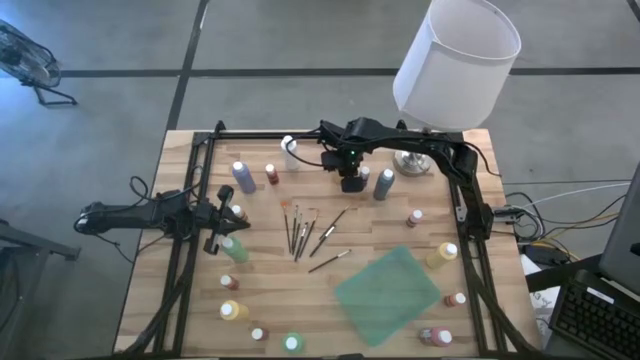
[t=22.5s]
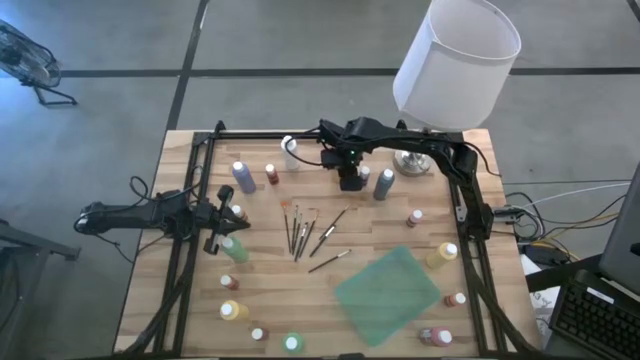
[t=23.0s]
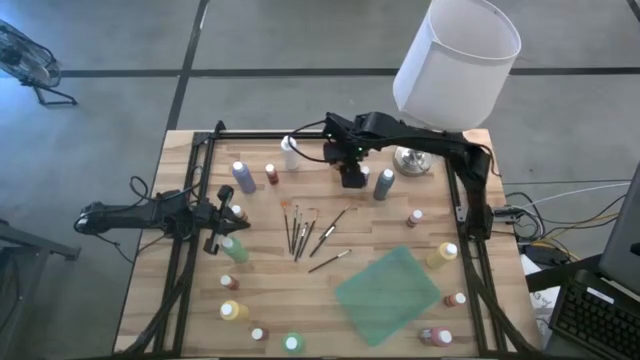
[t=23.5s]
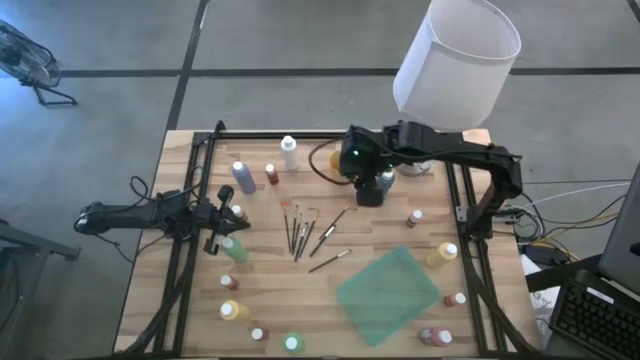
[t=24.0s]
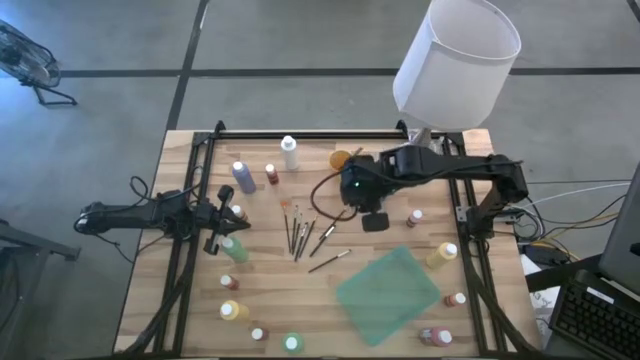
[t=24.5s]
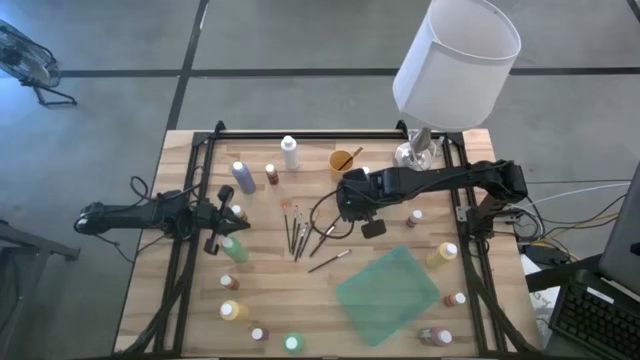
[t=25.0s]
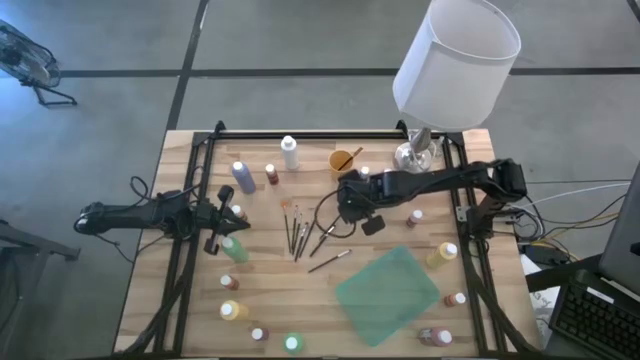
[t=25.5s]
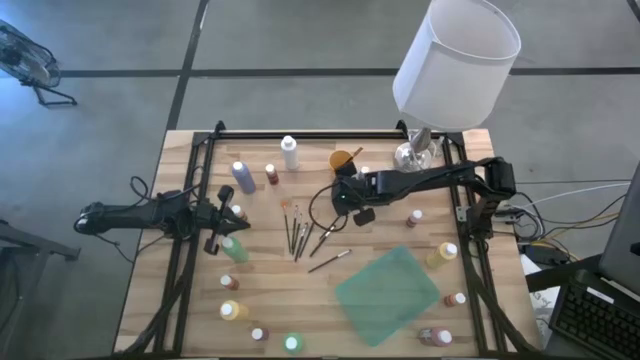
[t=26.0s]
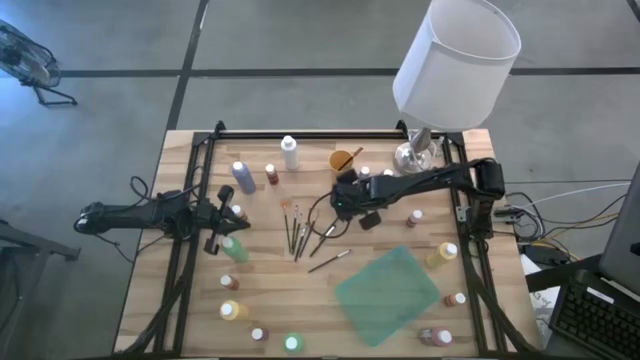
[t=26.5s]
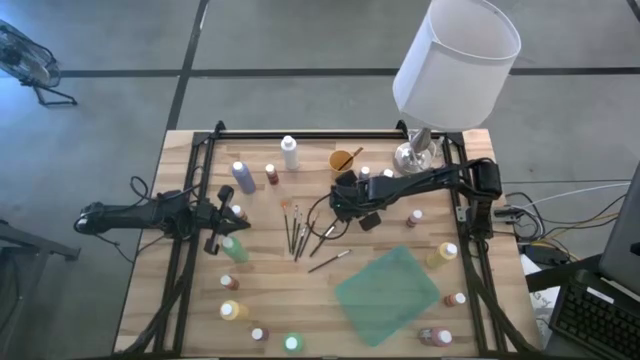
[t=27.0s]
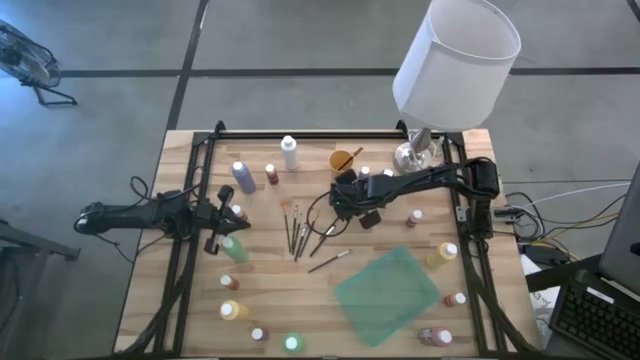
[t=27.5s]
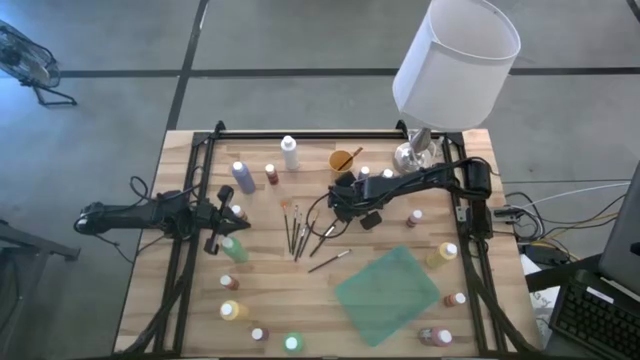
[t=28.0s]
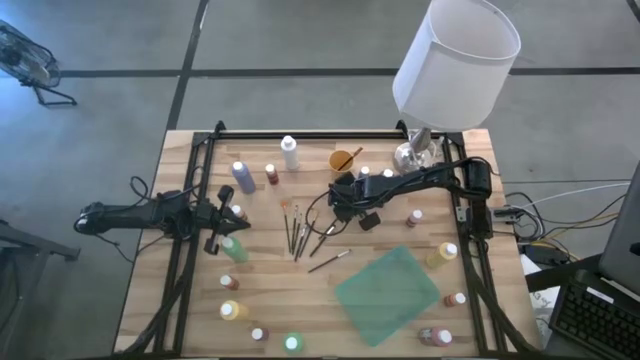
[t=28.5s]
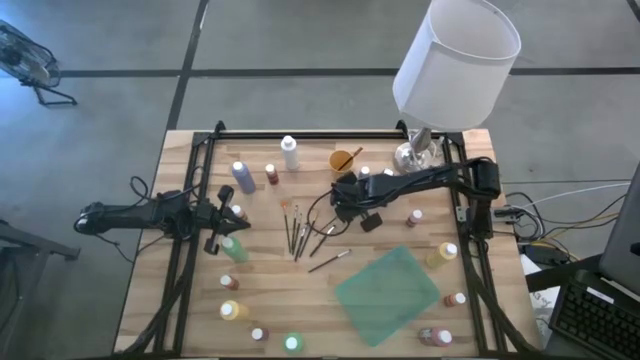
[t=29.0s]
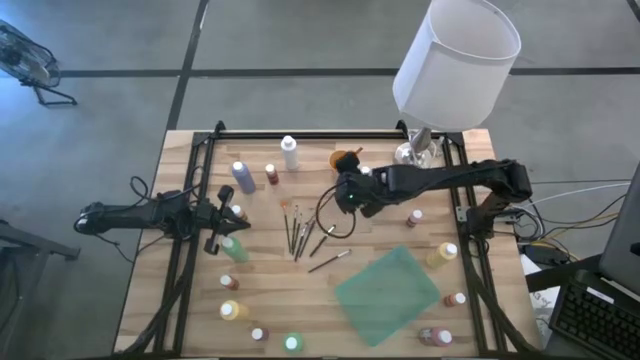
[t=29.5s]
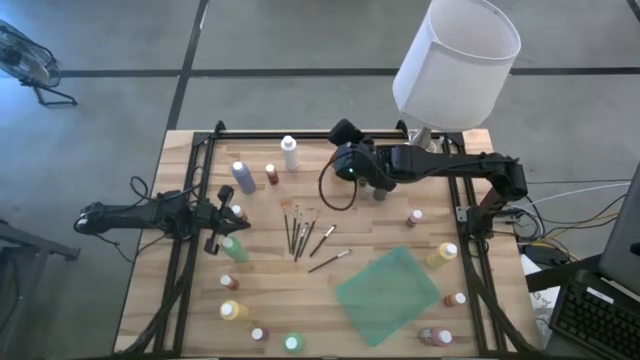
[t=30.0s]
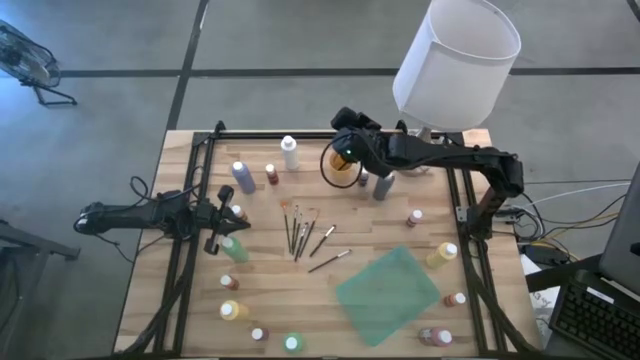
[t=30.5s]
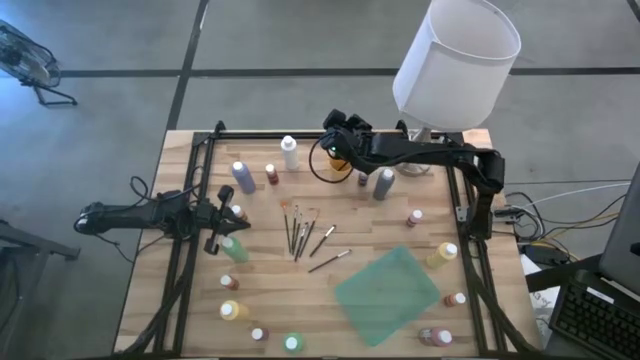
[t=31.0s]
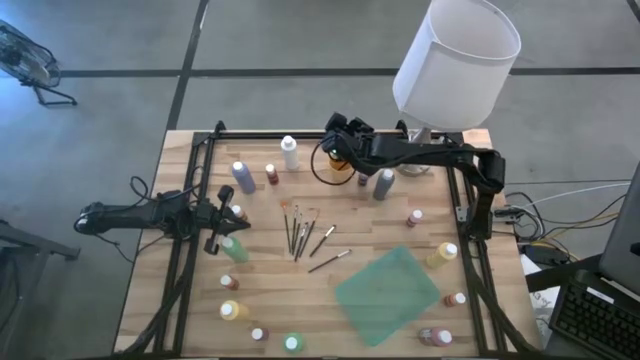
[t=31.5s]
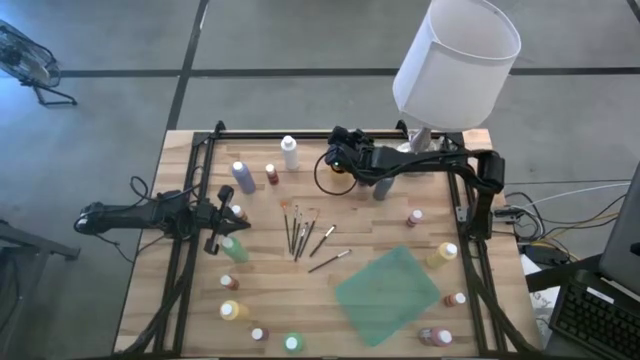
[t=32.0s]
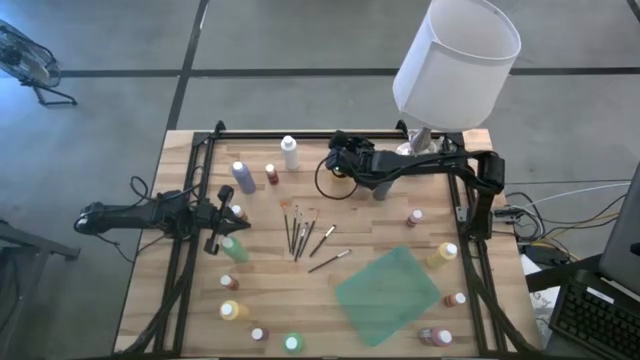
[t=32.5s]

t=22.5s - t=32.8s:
Task: Pick & Place Paint Supplies
Put the gold paintbrush into the yellow cup

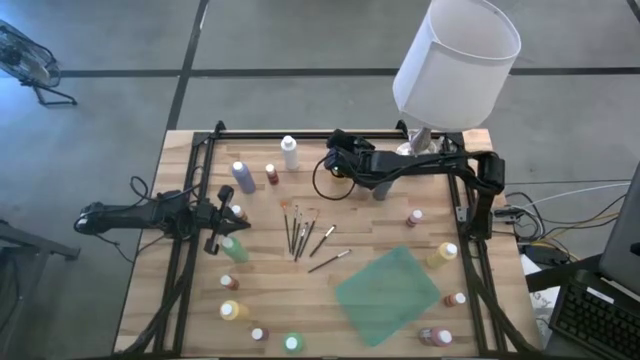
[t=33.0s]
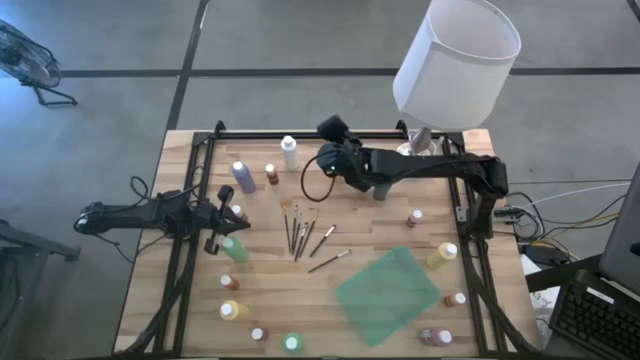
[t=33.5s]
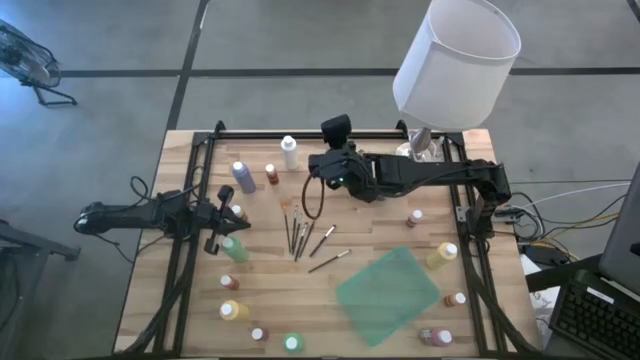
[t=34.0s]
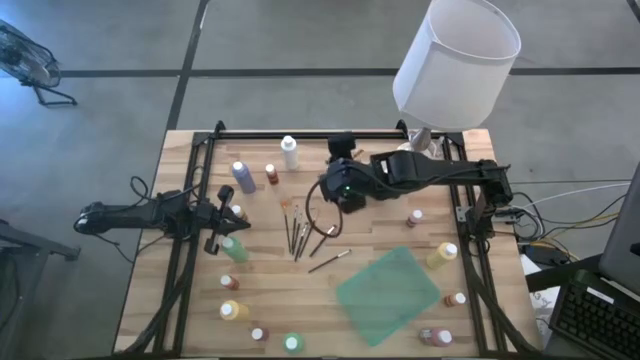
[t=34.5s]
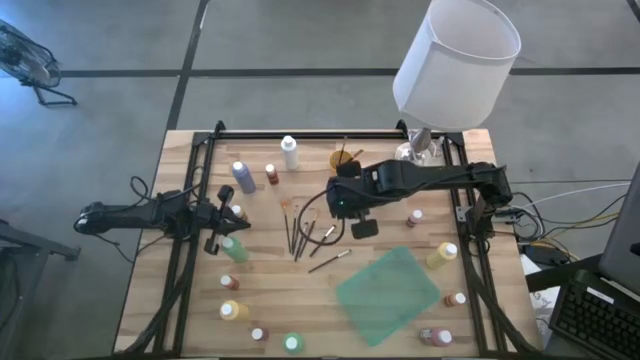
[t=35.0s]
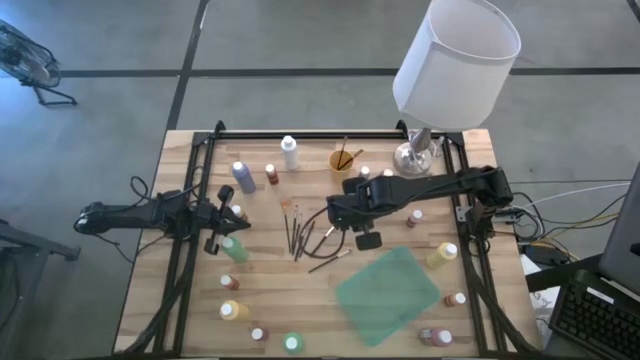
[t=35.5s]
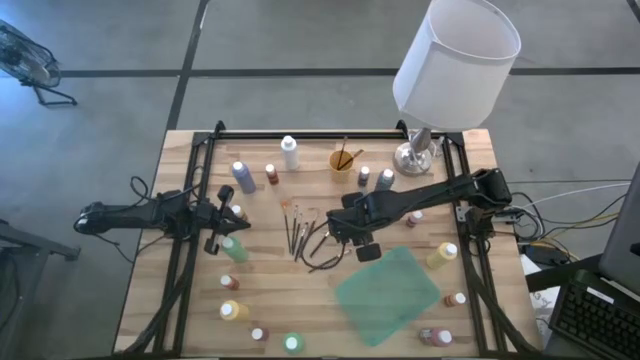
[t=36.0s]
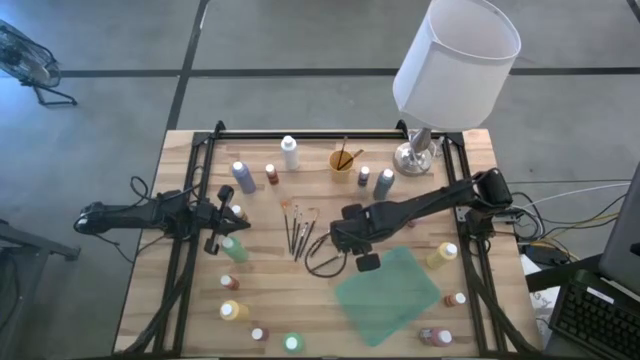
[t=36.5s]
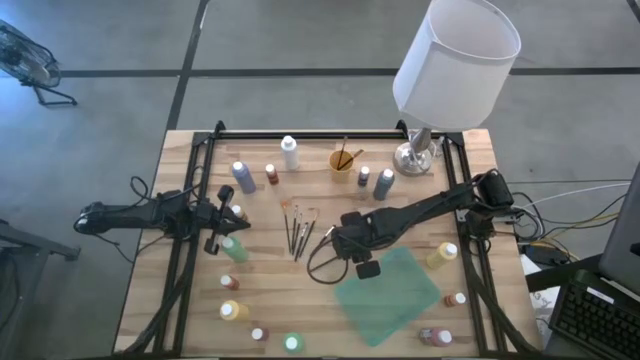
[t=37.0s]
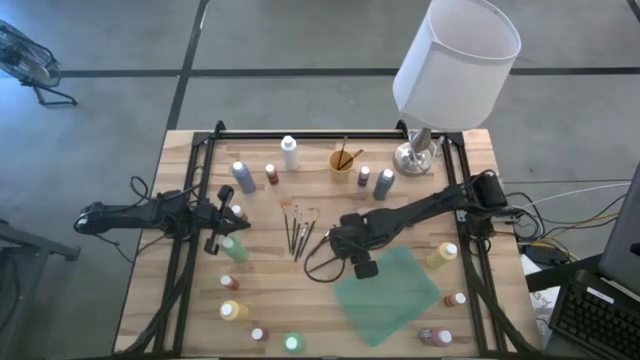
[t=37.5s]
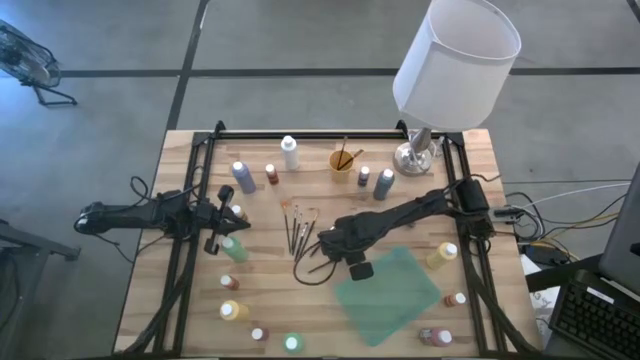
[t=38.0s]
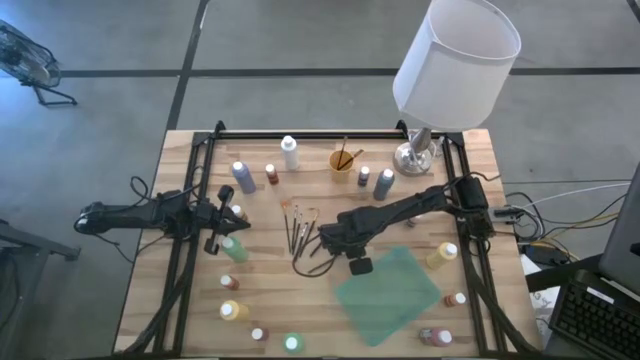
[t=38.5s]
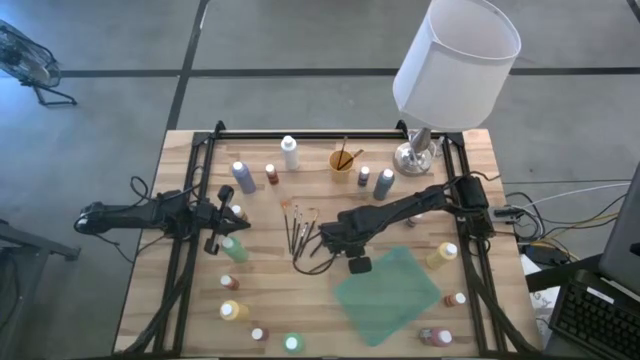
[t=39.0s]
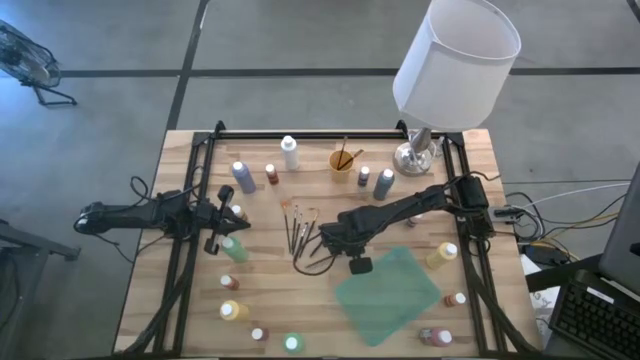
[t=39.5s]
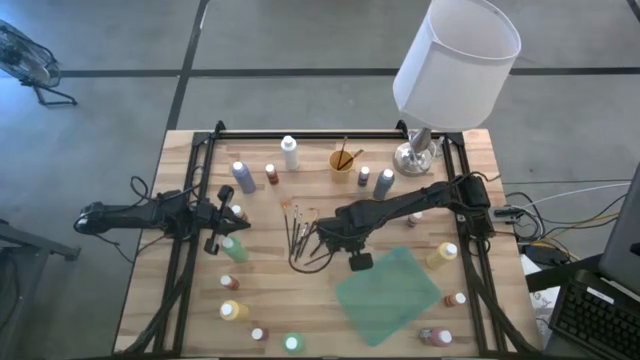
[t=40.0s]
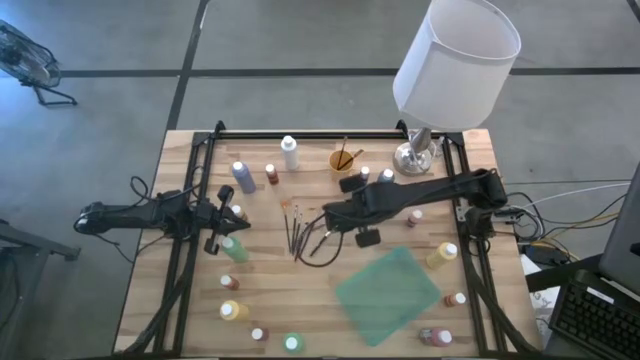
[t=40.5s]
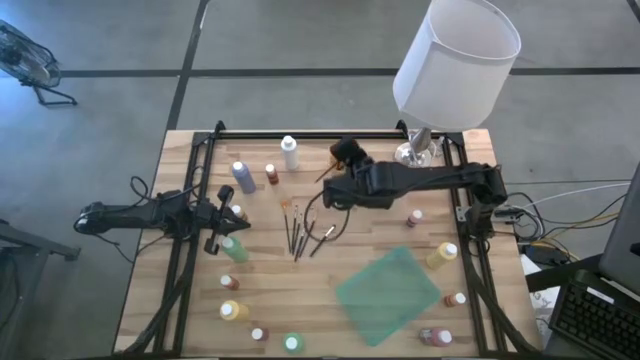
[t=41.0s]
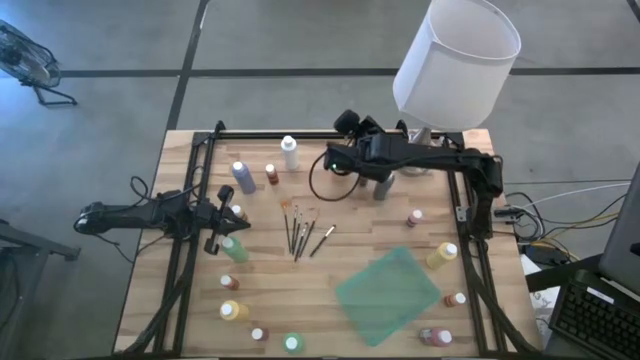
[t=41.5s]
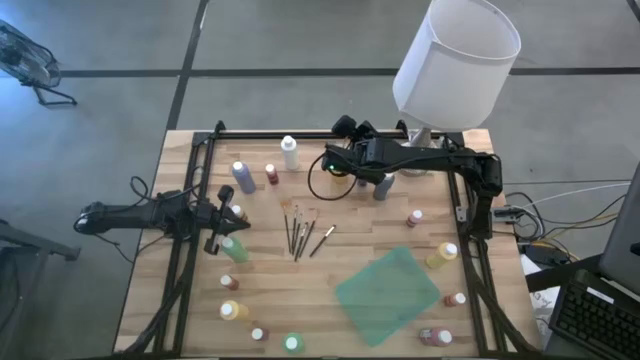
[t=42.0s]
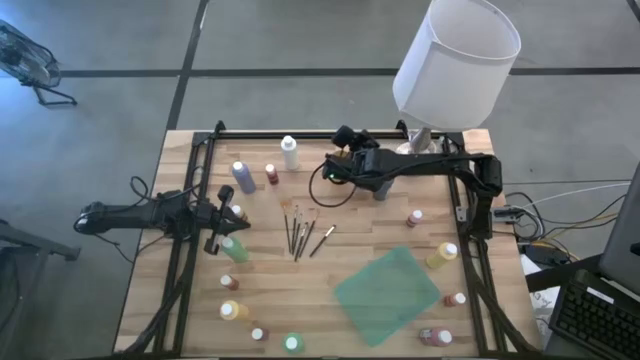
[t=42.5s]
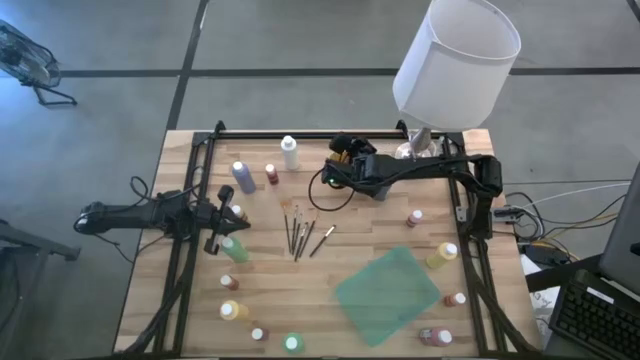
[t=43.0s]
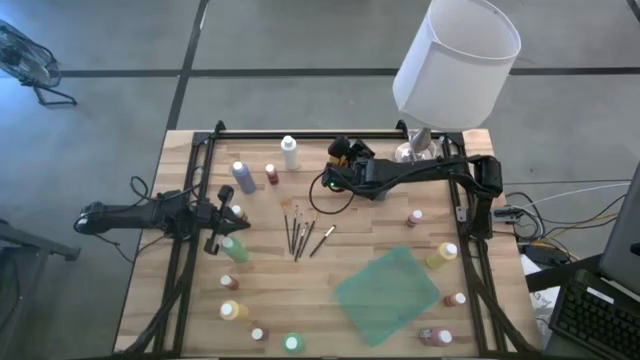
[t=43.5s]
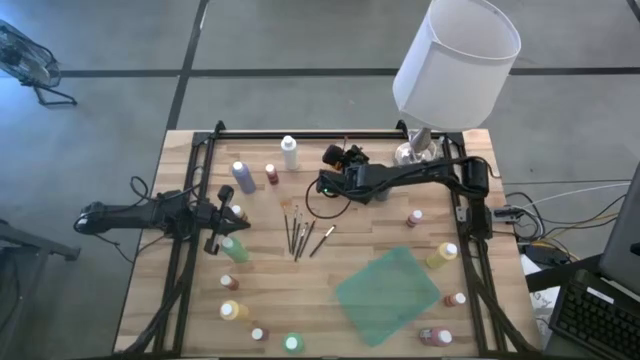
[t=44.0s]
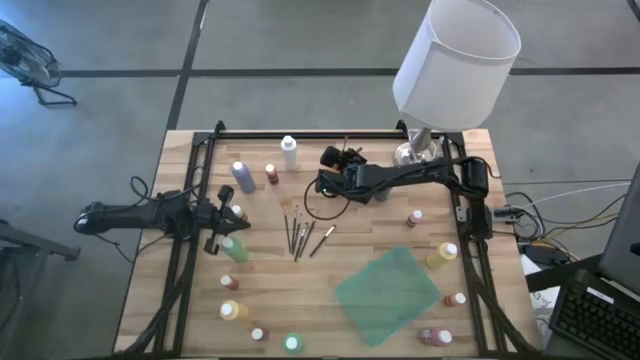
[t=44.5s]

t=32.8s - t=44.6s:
Put the silver paintbrush into the yellow cup
